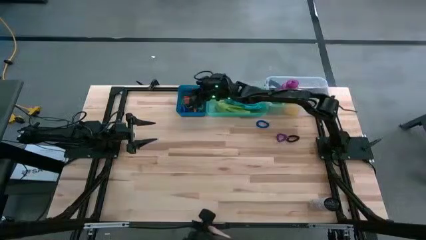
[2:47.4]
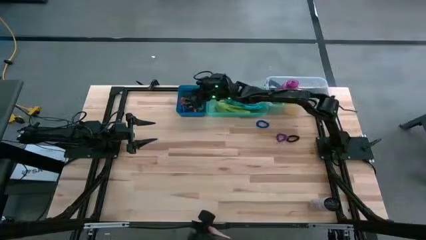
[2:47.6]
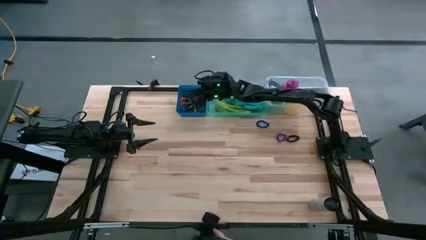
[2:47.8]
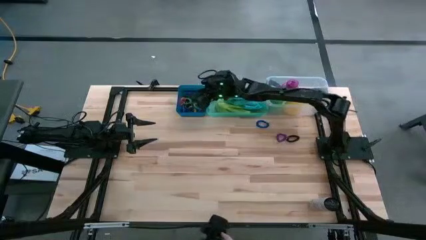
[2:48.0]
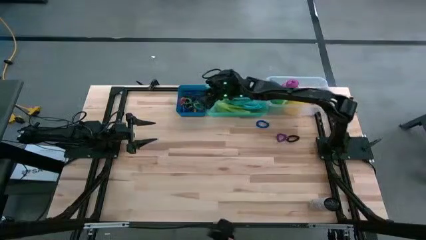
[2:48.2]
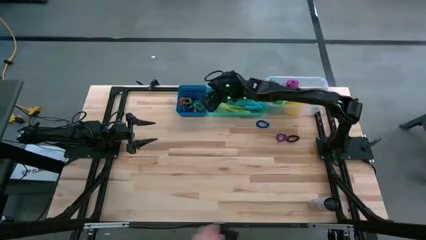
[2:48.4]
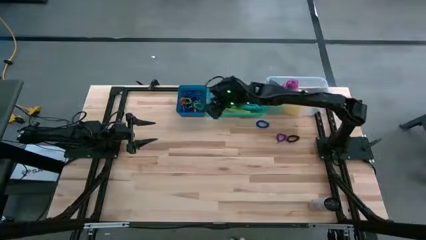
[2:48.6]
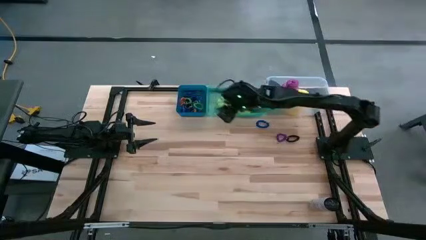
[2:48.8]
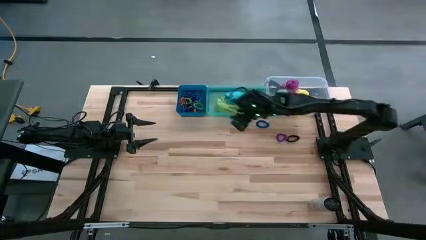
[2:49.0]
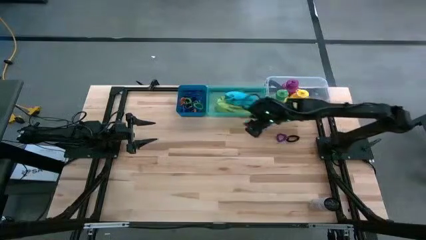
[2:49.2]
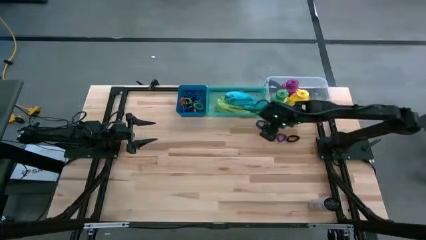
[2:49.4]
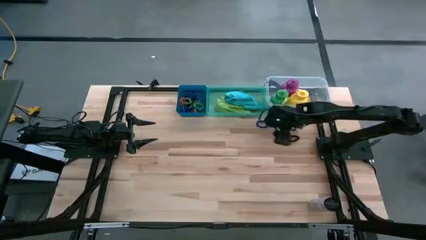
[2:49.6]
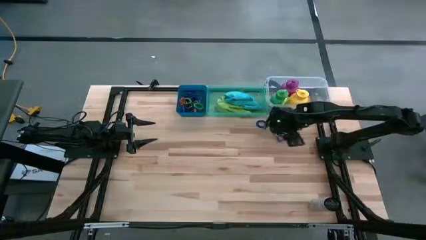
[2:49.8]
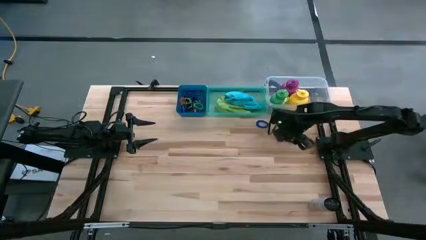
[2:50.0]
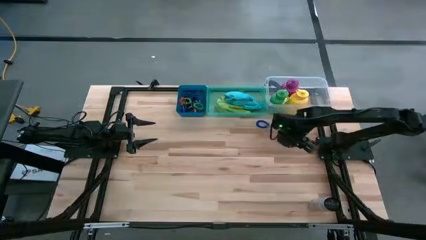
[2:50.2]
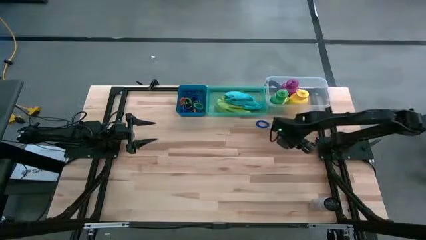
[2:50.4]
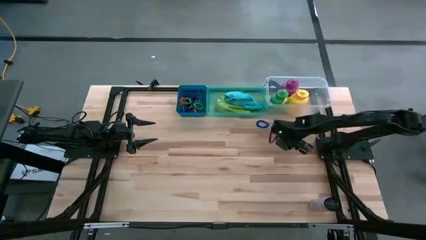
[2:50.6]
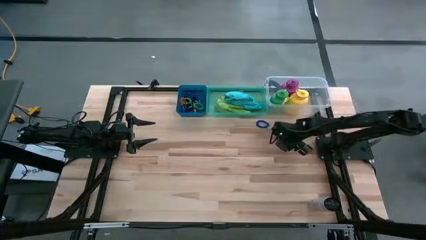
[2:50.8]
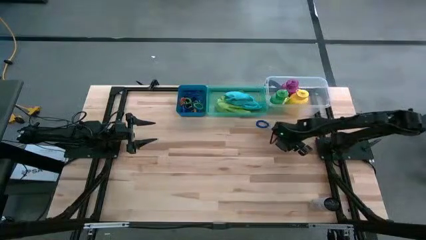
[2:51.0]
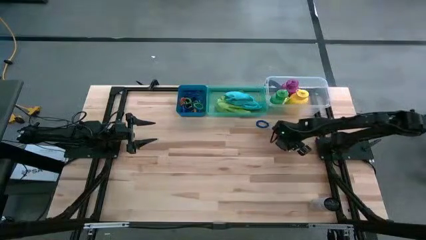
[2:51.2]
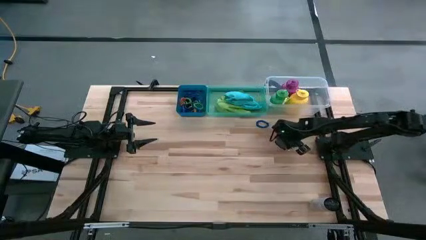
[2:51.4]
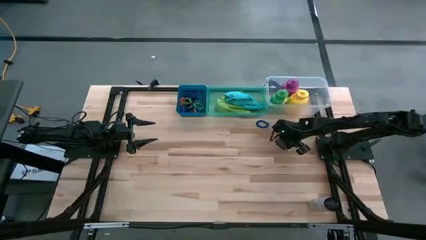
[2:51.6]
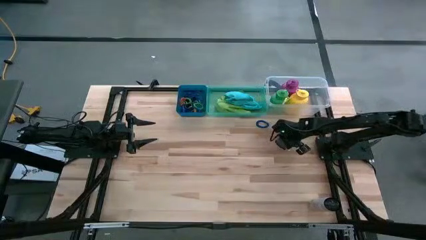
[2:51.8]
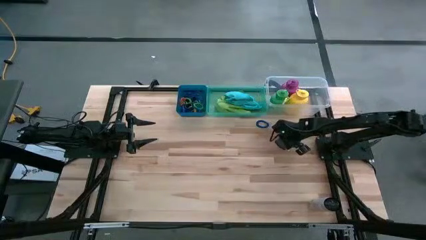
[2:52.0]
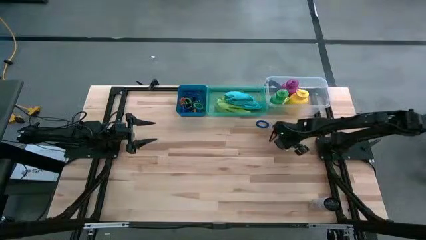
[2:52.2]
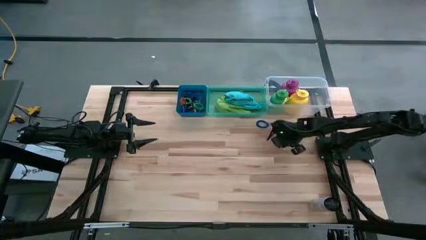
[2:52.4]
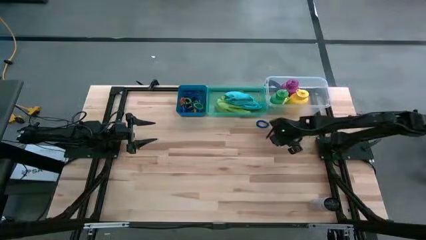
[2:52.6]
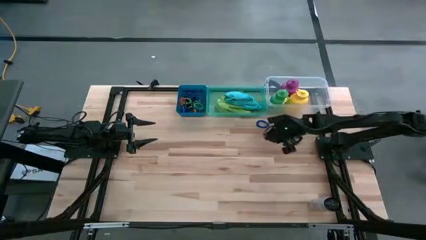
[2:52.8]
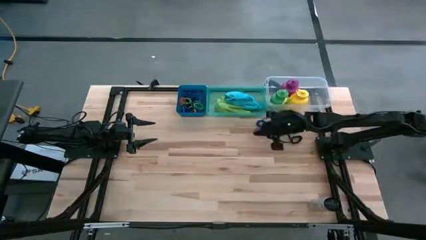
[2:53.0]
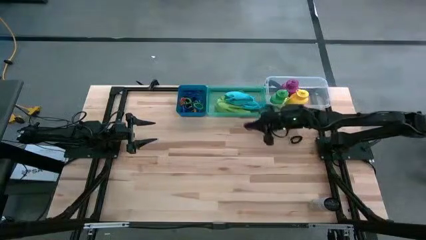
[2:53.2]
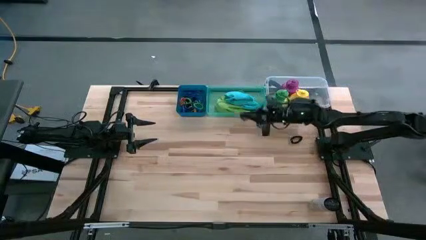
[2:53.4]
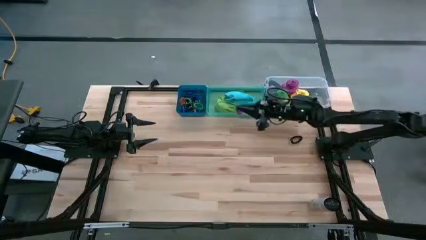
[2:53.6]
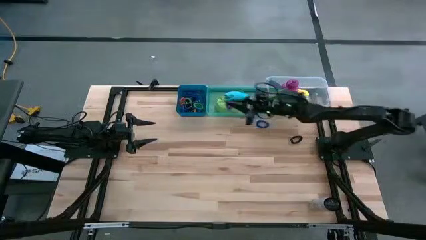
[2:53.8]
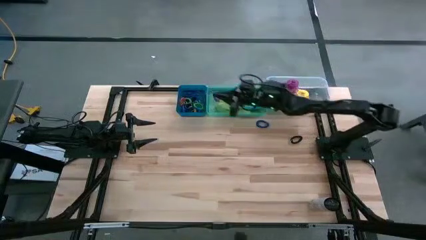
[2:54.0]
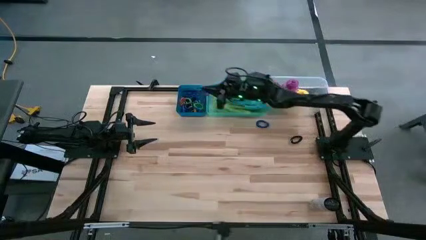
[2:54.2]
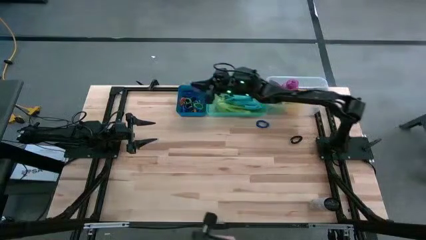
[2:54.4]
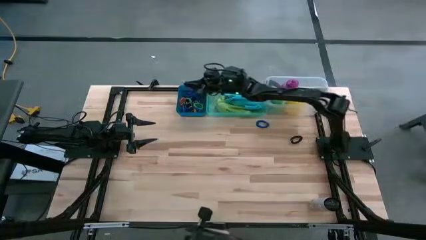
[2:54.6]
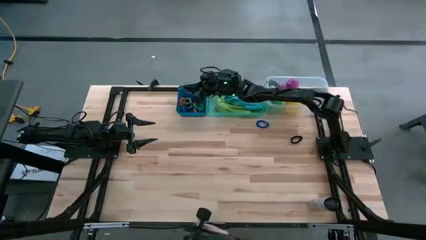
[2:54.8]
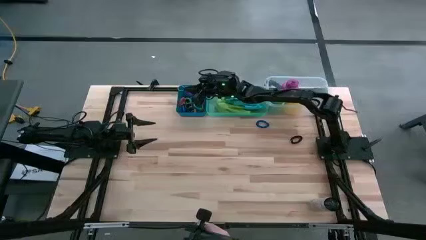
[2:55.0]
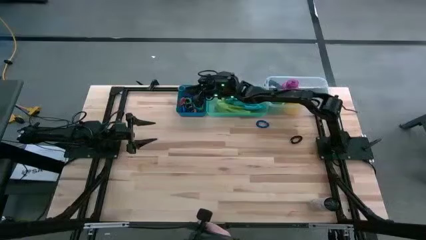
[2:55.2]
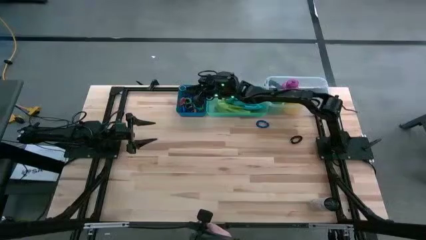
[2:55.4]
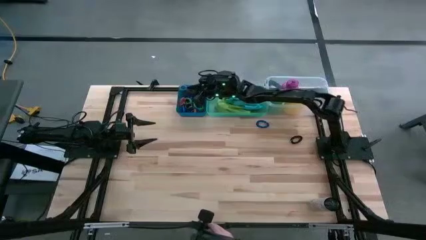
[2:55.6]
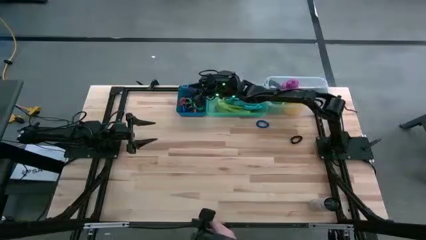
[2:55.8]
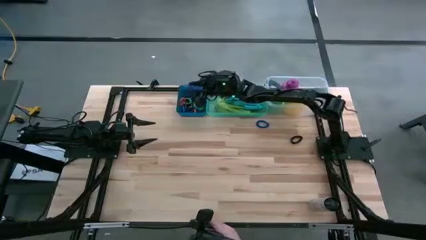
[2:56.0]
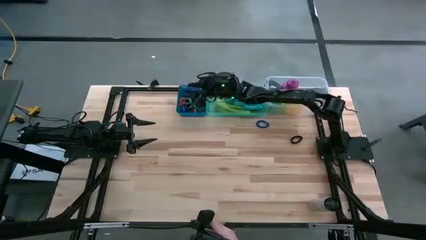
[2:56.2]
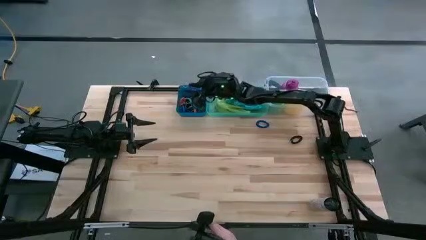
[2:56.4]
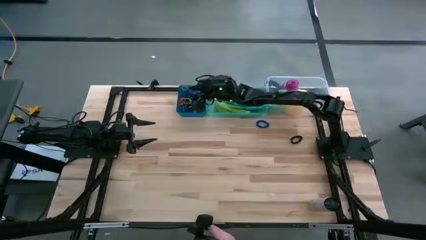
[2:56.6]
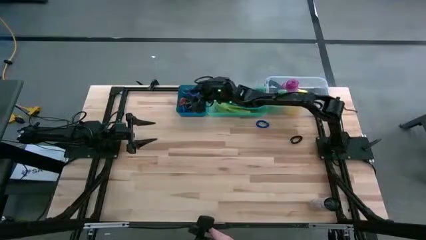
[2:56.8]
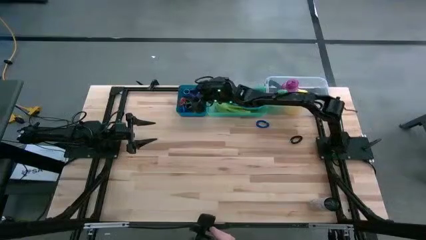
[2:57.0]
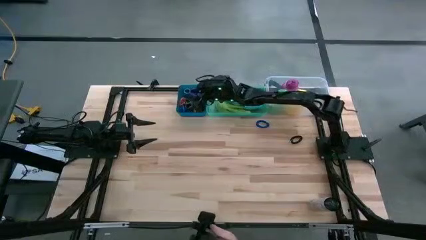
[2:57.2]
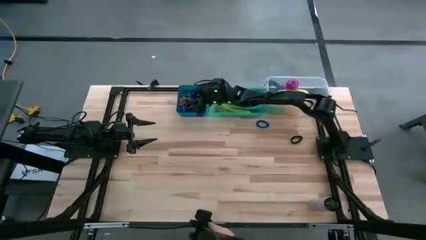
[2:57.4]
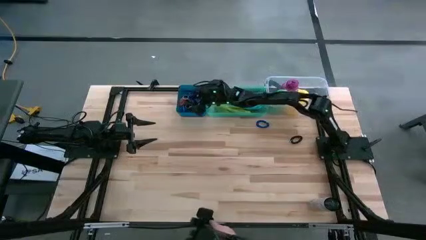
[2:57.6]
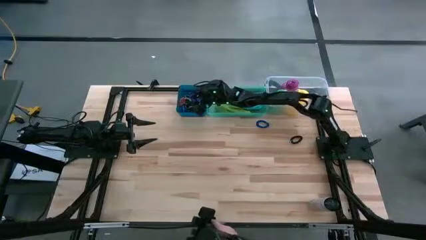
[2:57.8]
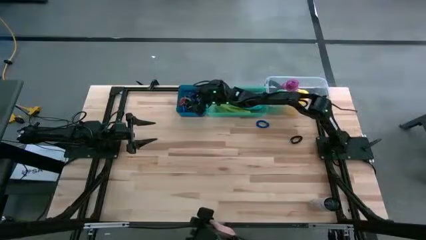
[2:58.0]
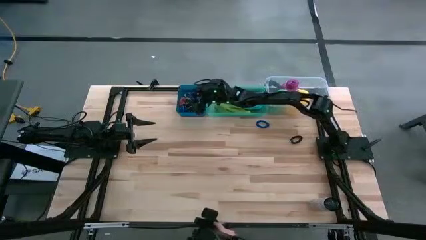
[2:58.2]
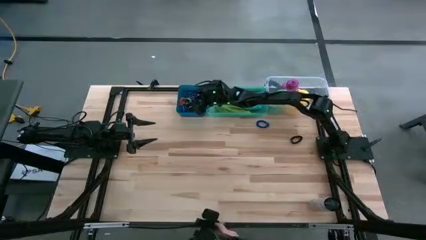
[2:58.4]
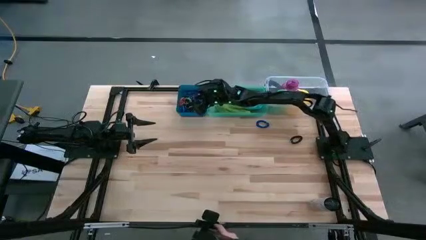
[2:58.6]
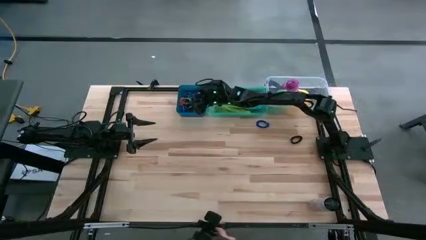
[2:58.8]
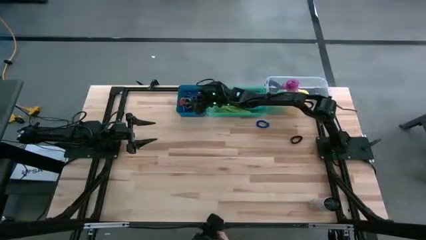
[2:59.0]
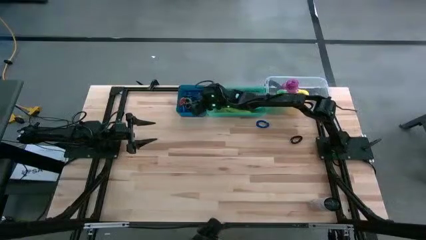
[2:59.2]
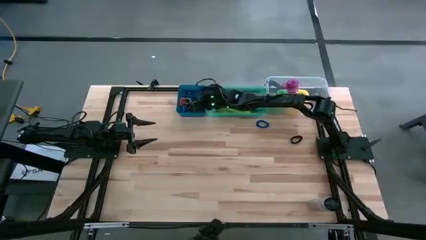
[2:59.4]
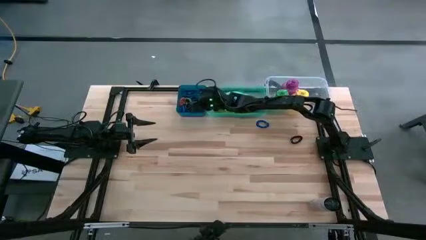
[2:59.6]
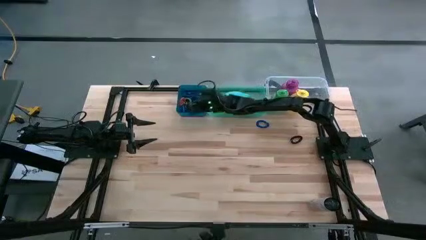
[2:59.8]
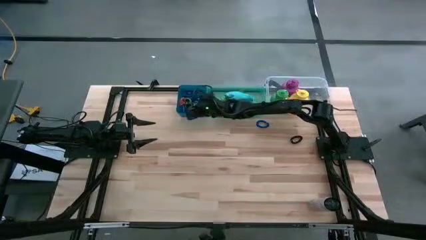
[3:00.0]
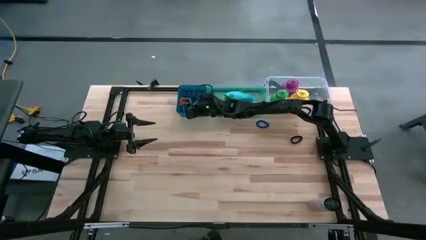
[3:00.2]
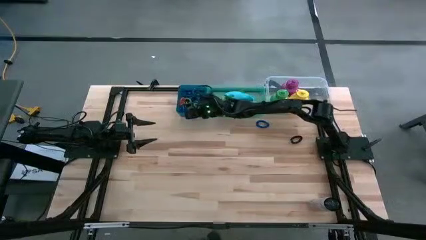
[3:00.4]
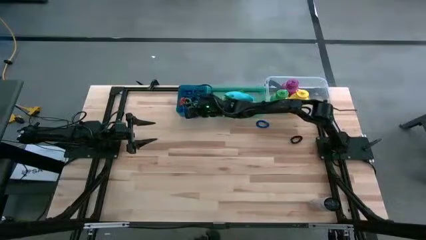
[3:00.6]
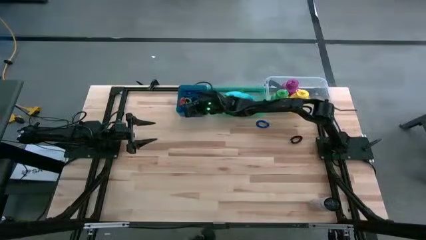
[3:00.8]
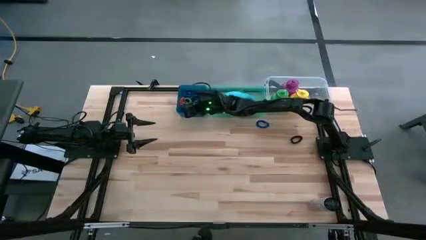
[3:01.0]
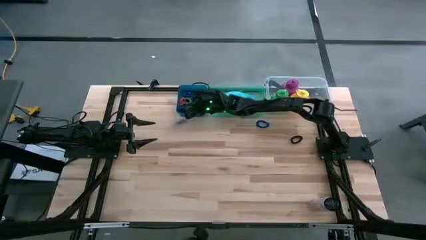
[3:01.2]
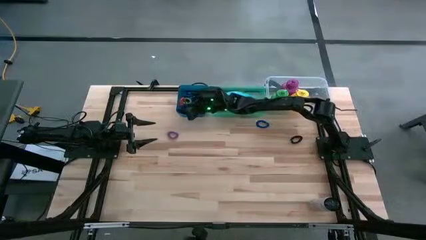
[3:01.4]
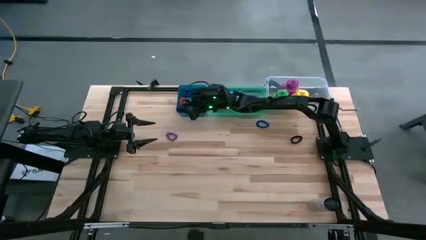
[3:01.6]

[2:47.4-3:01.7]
Task: Pick & Place Sports Items
Put the violet spring keychain into the blue bin

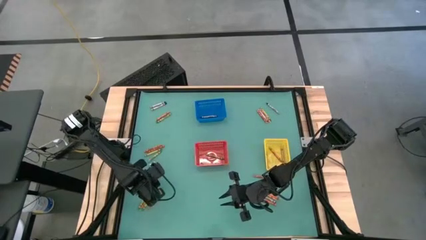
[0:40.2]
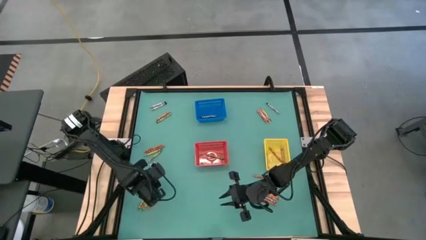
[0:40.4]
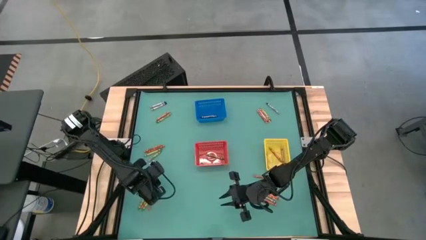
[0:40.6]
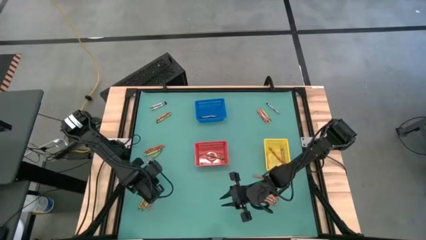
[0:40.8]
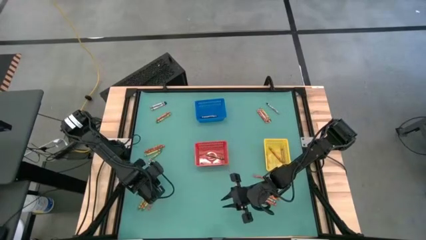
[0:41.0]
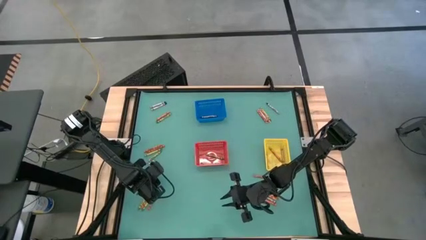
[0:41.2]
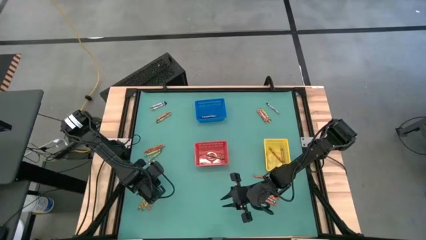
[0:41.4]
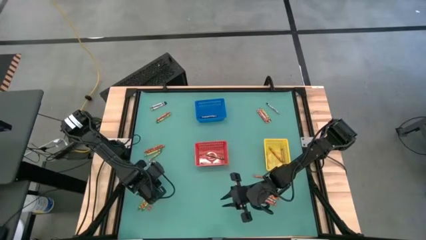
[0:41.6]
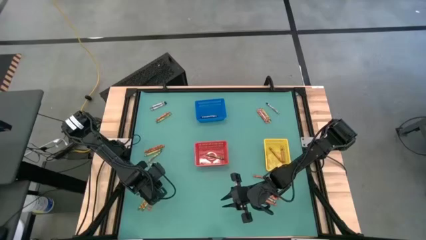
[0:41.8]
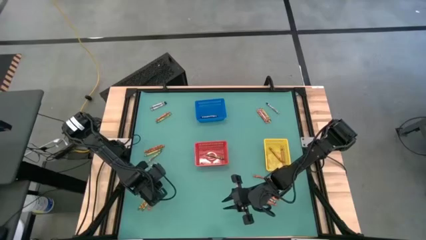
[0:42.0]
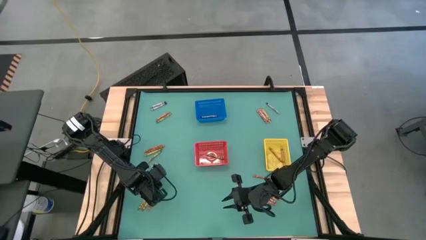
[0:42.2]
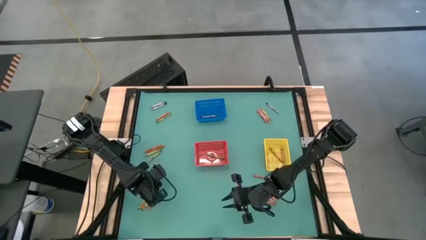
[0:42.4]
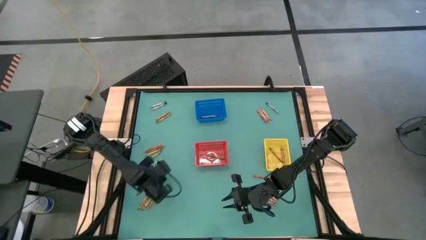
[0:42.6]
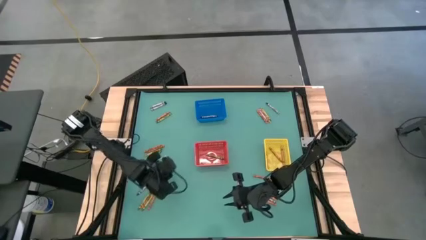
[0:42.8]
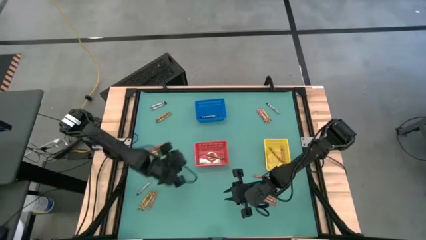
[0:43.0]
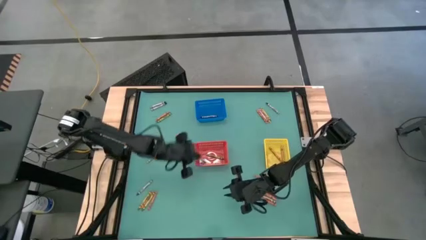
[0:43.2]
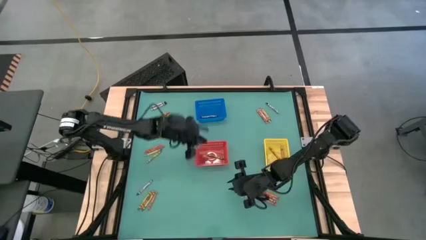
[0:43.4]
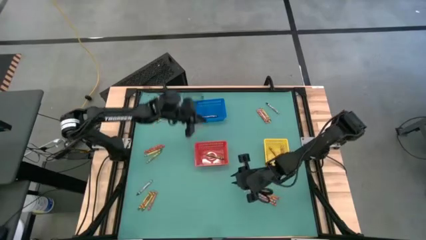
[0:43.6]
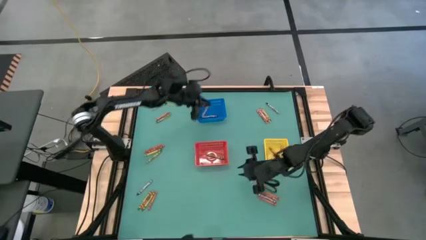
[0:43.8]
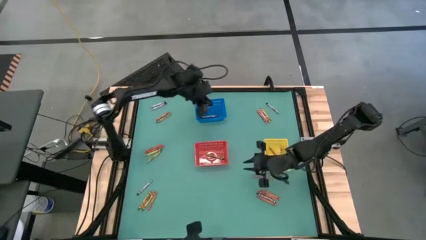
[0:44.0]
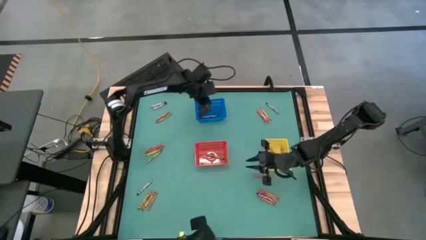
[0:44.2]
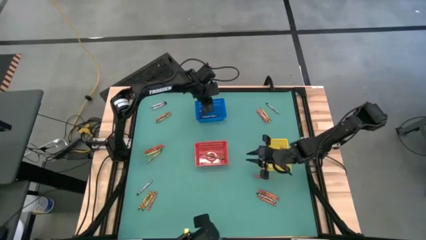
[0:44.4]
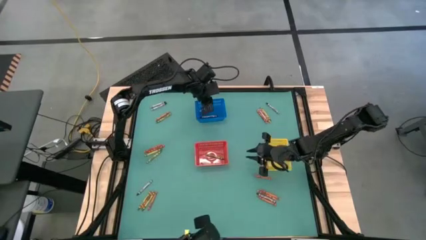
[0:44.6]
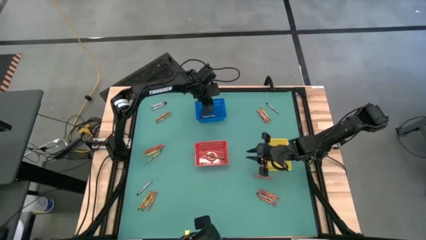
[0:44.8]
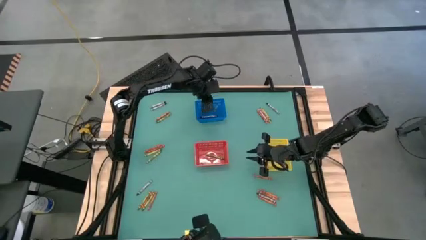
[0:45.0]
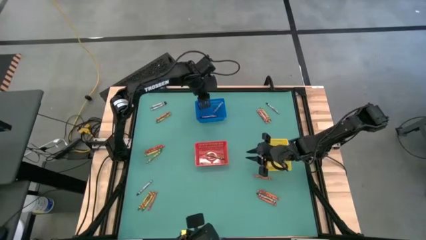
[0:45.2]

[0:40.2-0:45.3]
Task: Sort crayons
Put the black crayon into the blue bin
